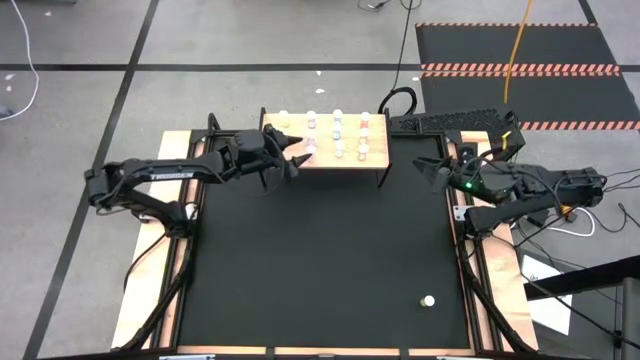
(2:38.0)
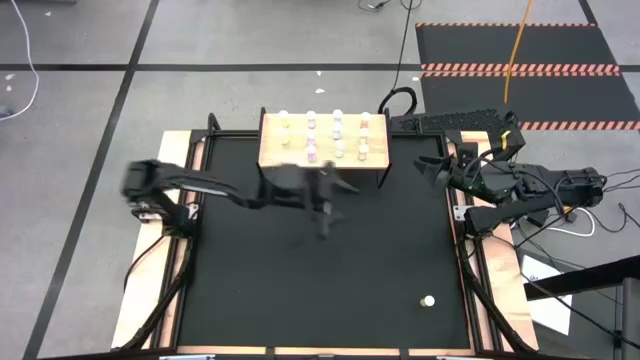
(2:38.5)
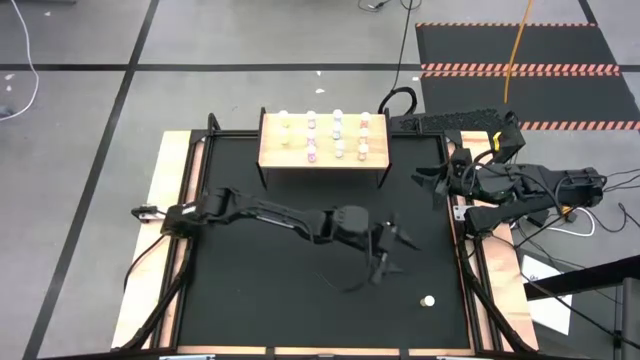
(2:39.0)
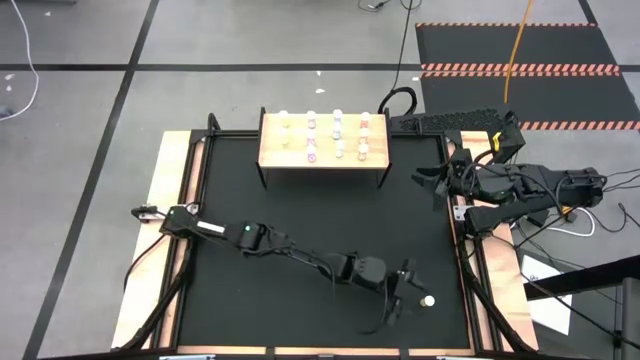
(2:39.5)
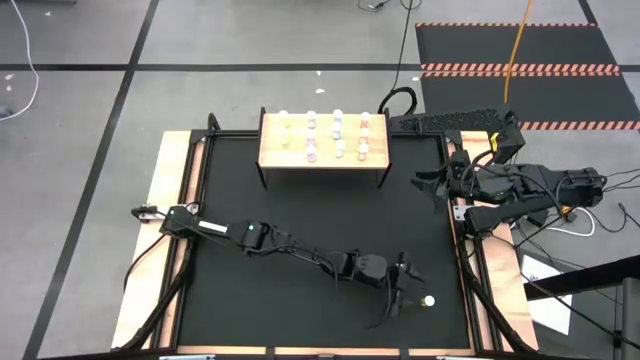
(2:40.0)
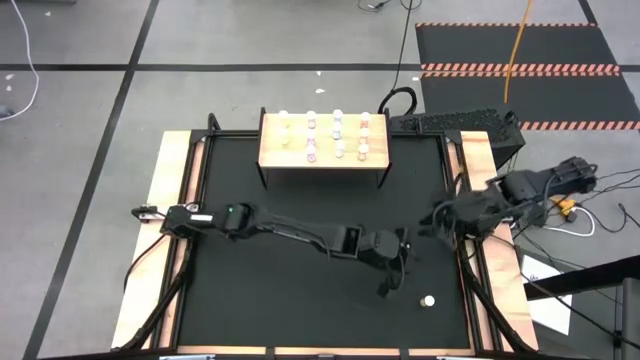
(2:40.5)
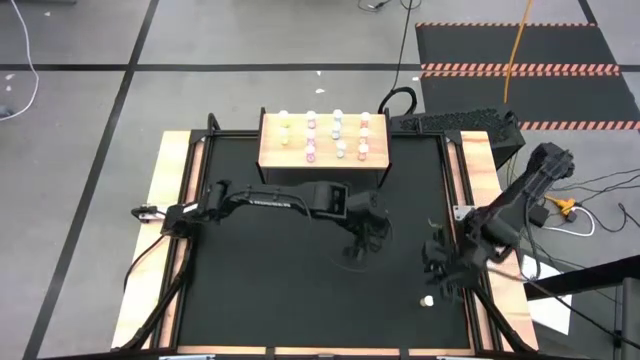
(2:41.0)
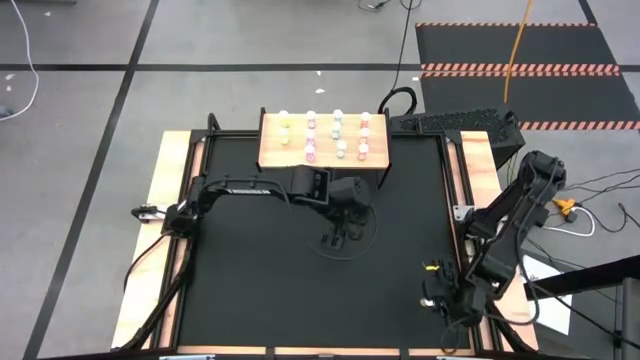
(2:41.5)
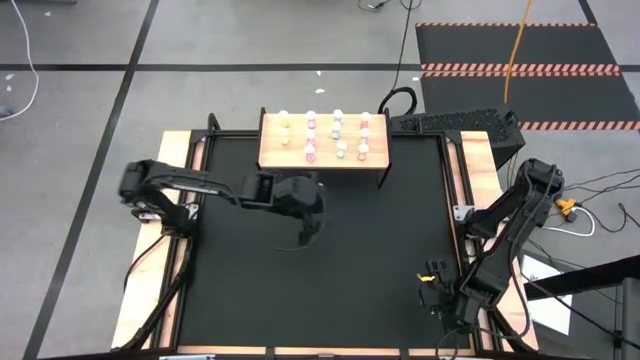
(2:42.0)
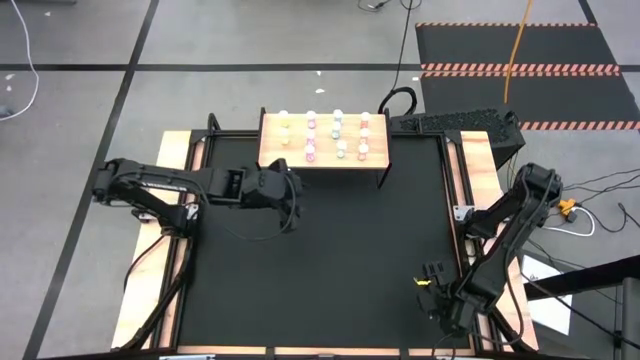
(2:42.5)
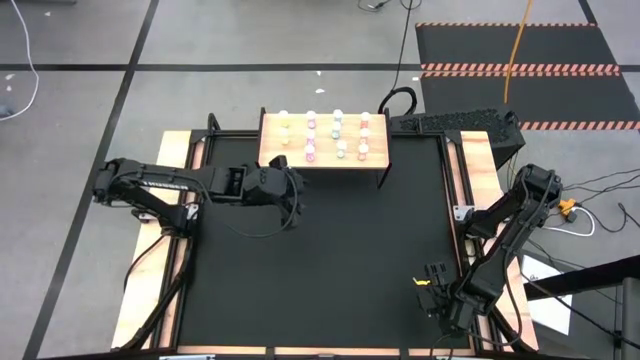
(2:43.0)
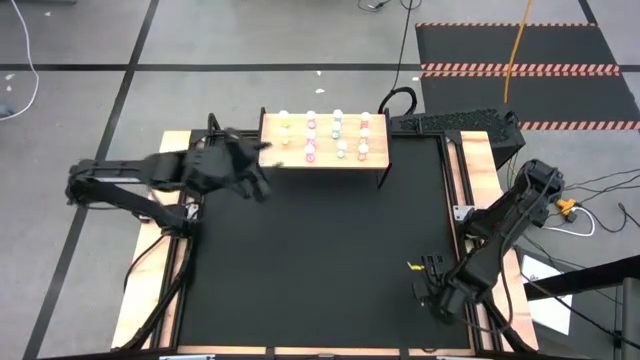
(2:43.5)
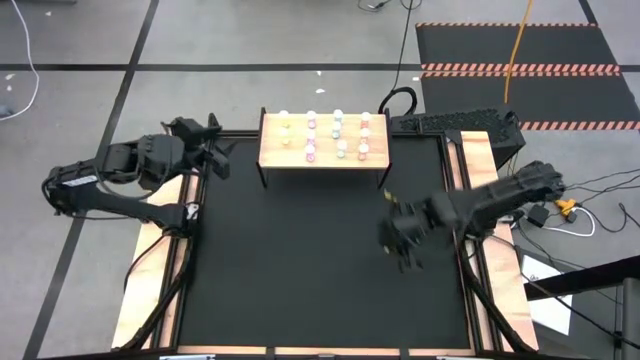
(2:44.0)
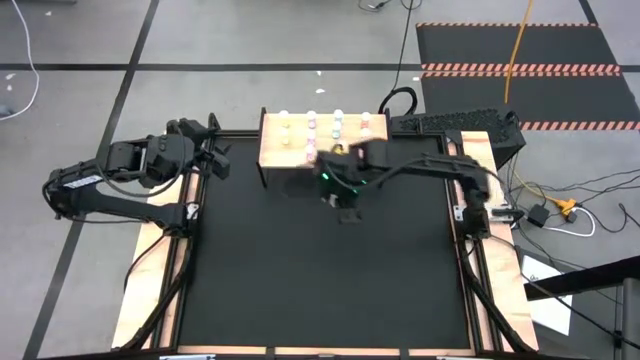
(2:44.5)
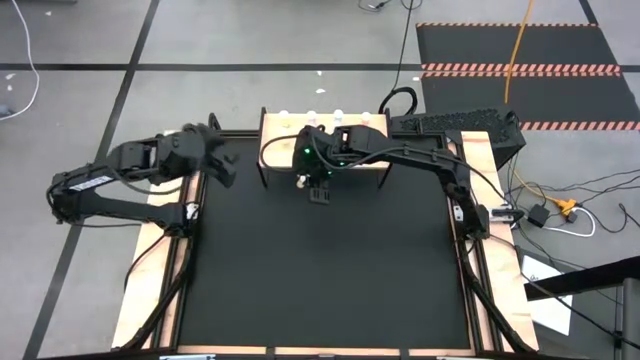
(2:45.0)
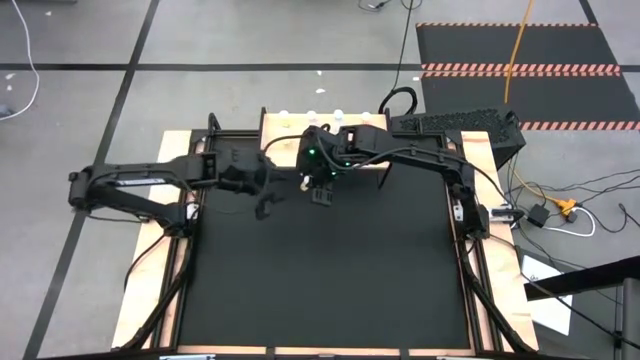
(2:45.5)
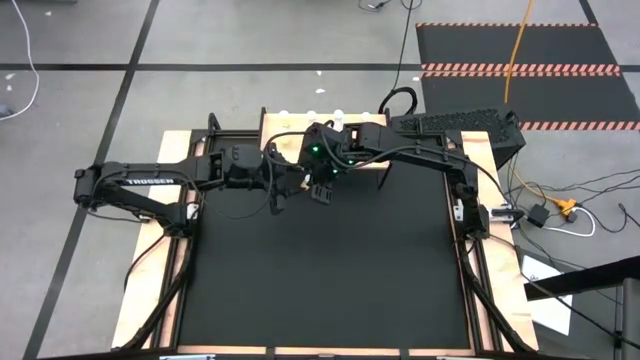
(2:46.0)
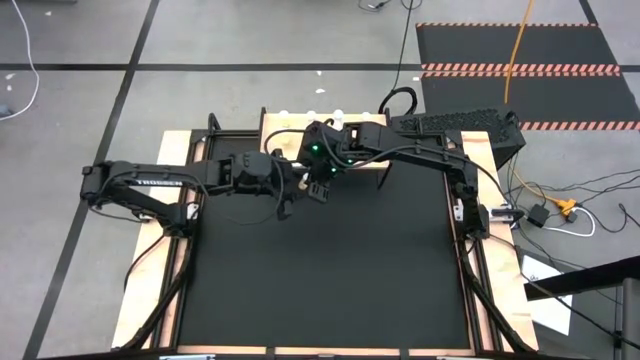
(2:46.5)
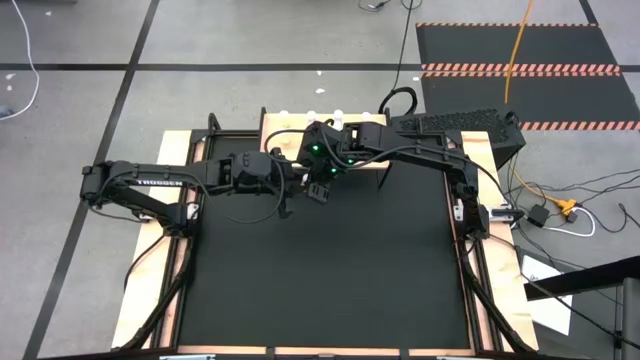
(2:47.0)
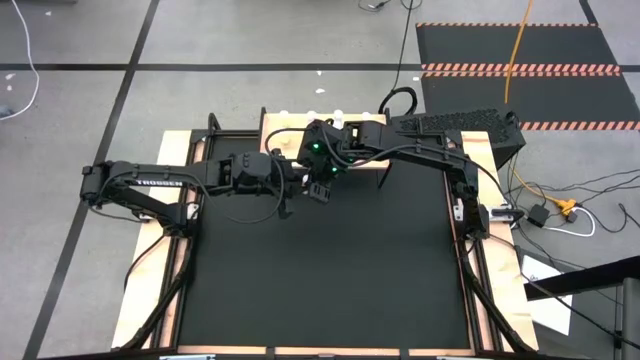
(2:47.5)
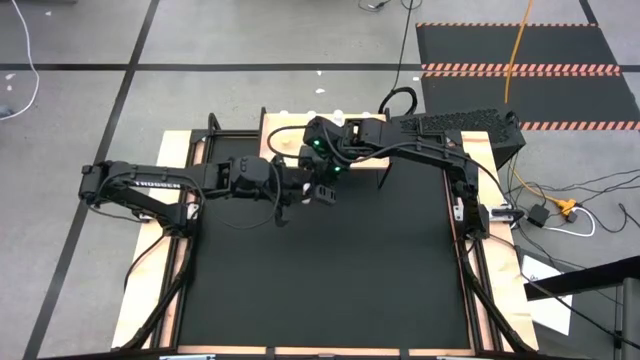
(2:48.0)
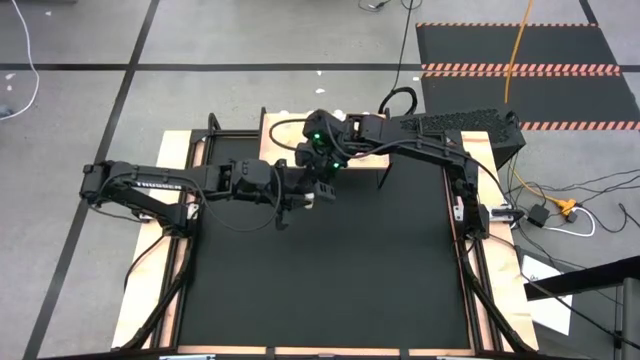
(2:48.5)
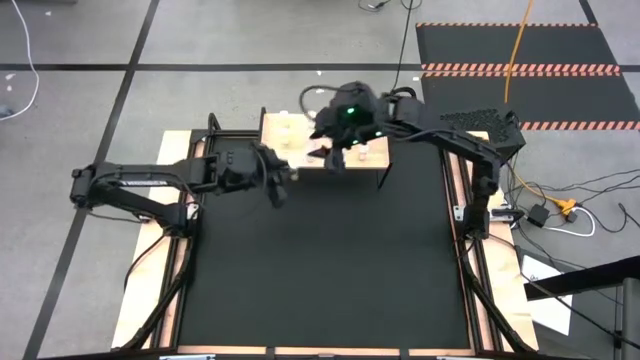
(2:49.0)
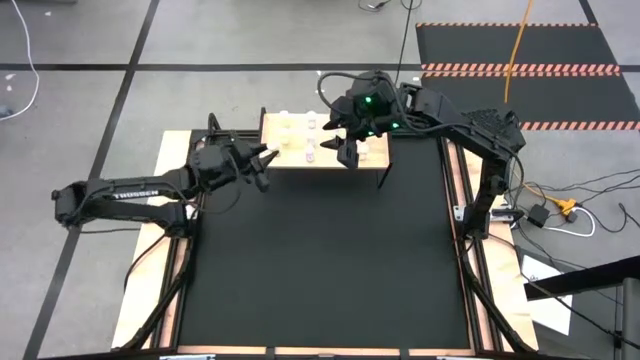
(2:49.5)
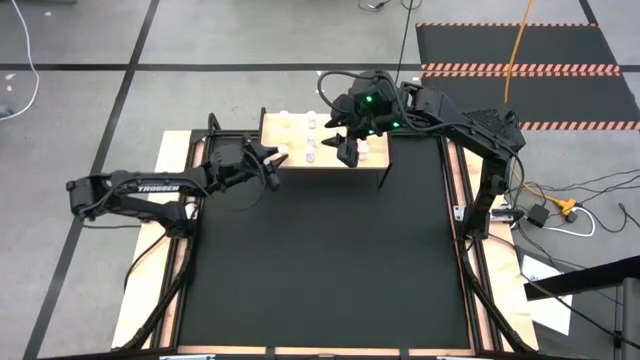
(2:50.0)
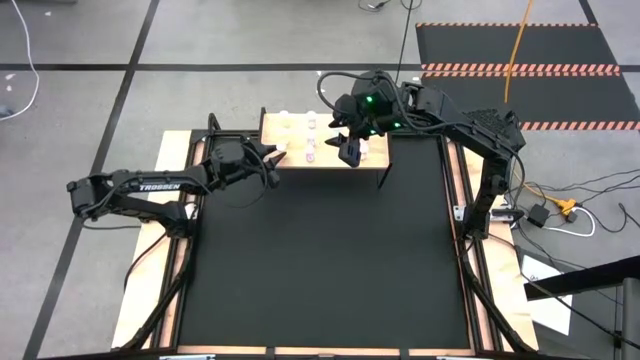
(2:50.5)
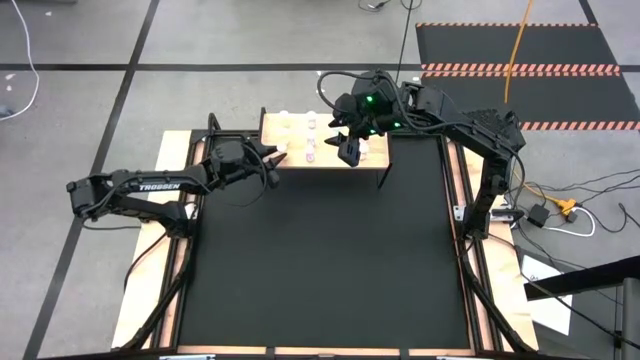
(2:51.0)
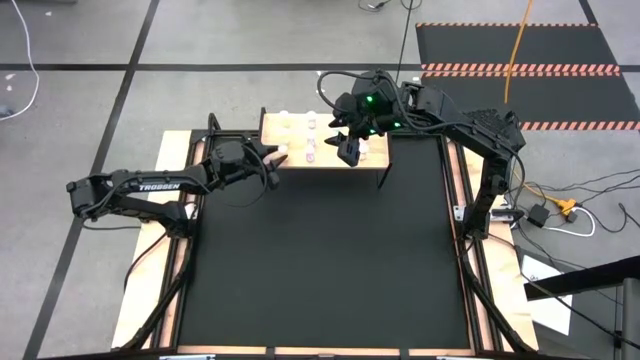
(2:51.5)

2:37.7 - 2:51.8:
Task: Pick and place medicine bottles onto shelf by color
Put the yellow pill bottle on the shelf aligned with the other yellow pill bottles

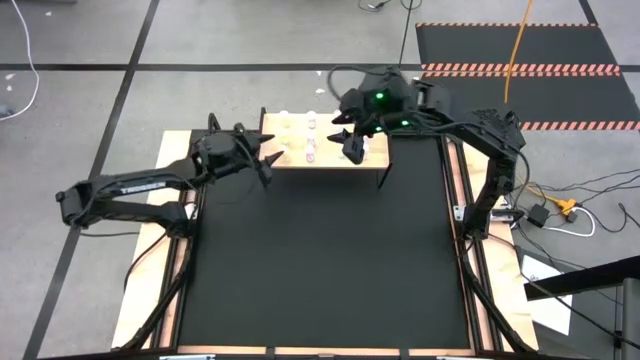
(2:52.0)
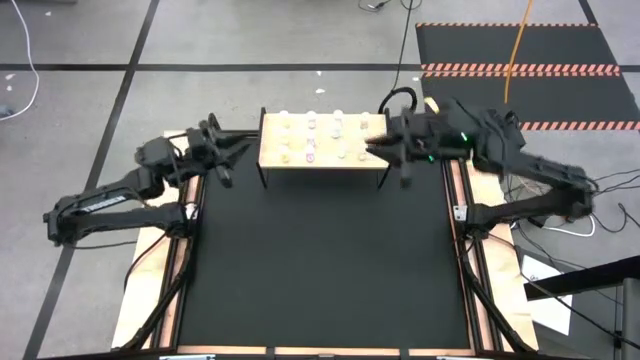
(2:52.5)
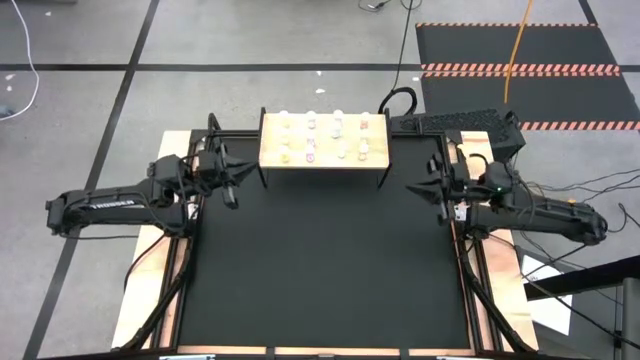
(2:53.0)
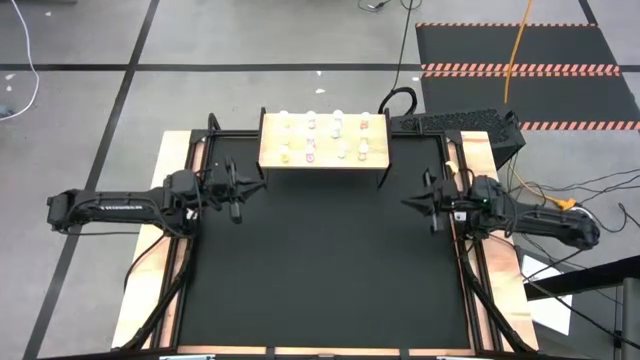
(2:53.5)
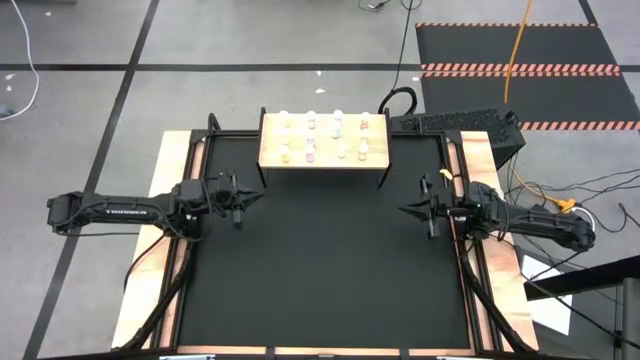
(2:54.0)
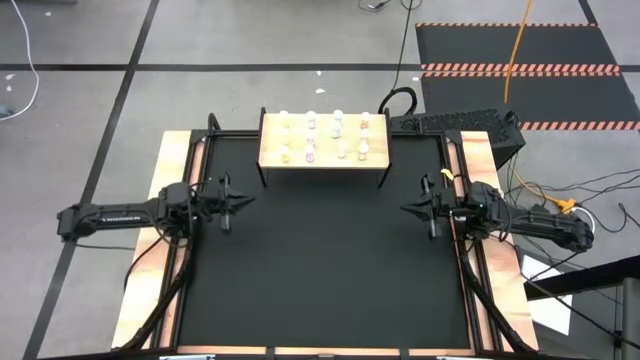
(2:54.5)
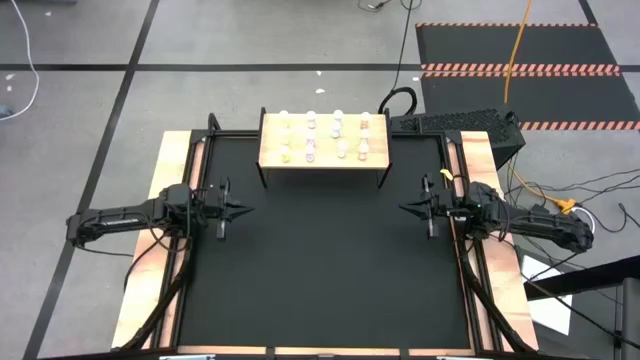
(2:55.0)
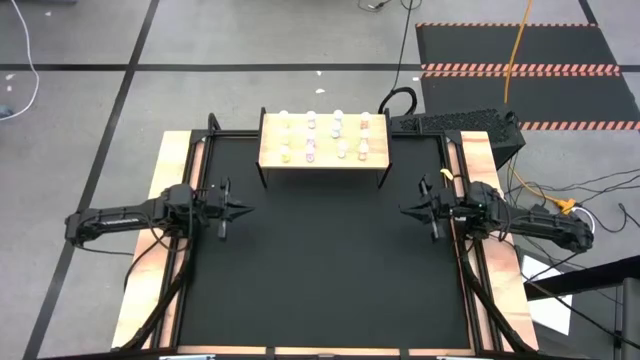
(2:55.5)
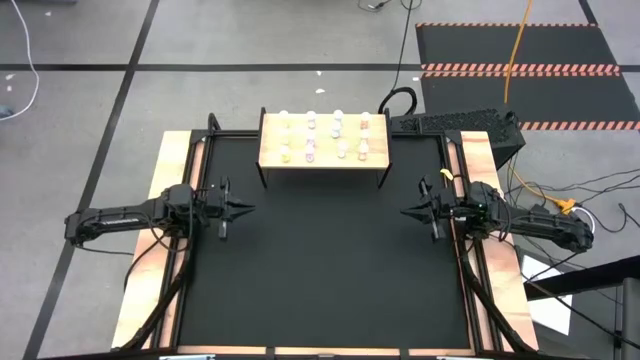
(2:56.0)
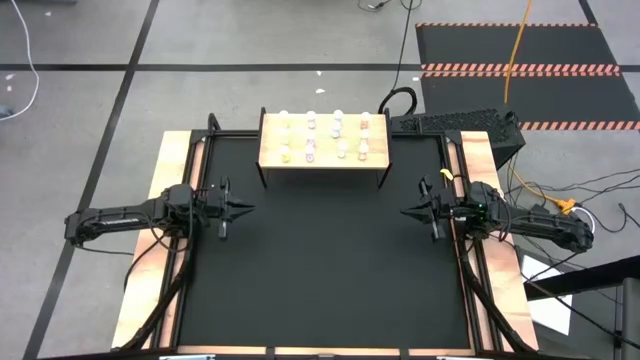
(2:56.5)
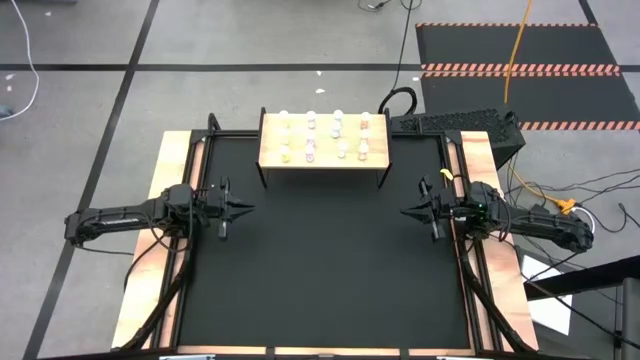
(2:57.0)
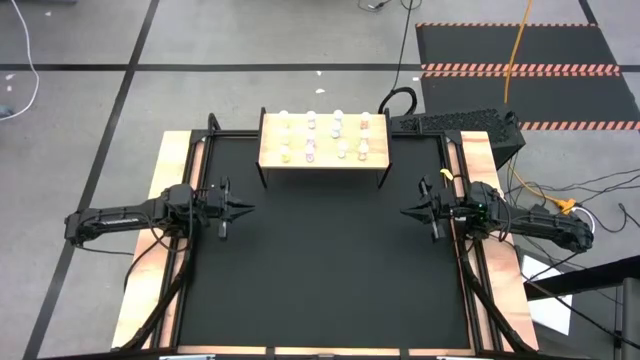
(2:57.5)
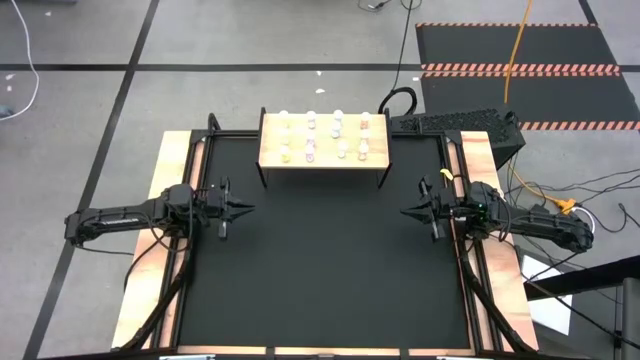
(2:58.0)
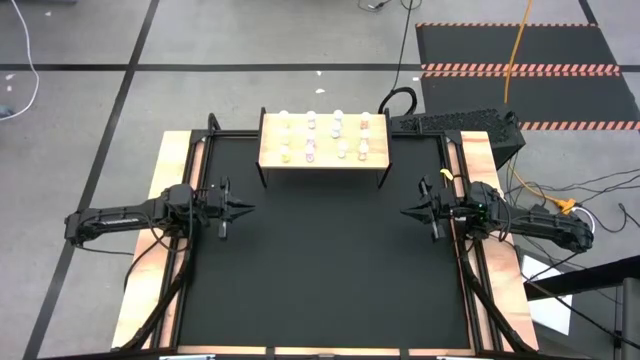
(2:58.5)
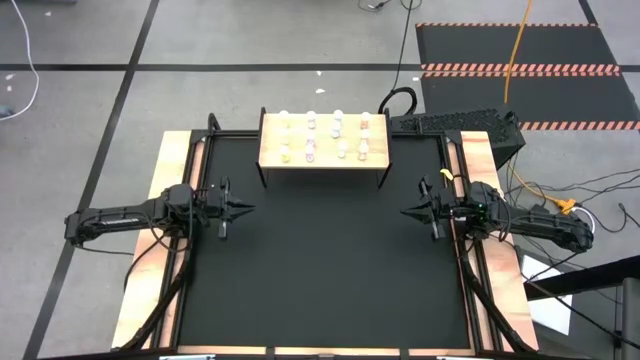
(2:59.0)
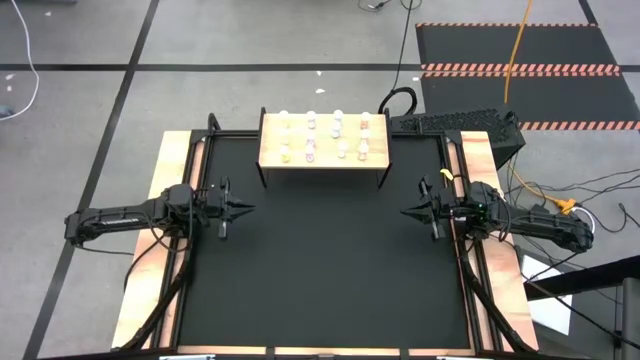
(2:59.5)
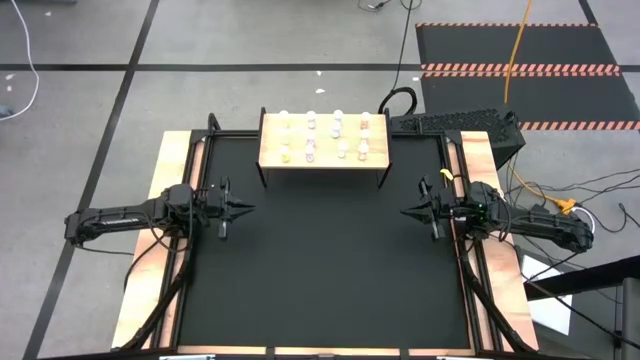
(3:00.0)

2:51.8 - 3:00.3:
Return to Home Position
